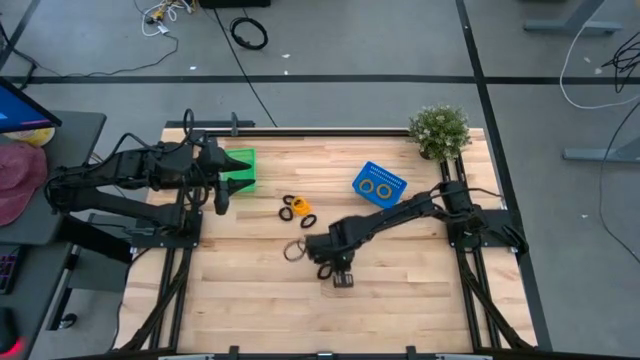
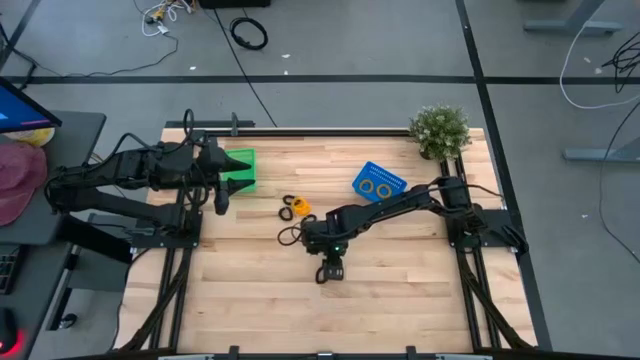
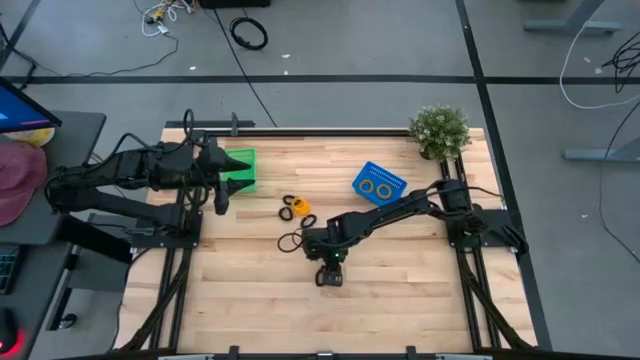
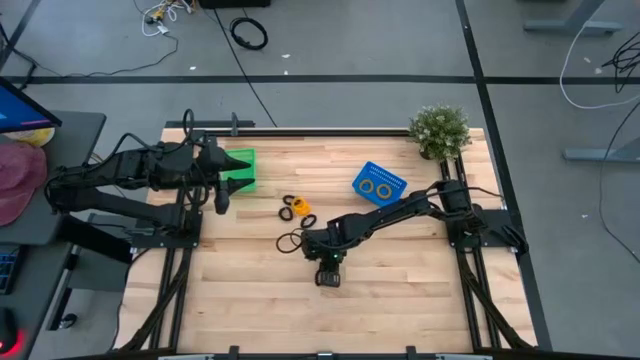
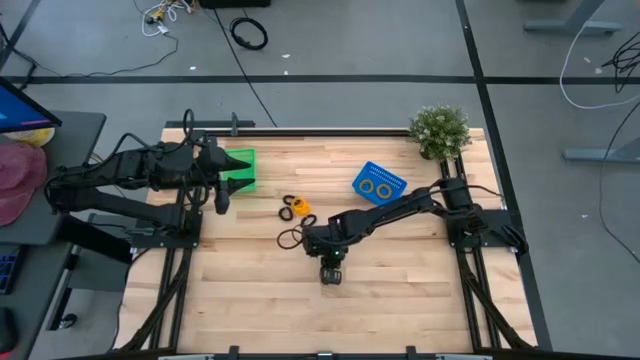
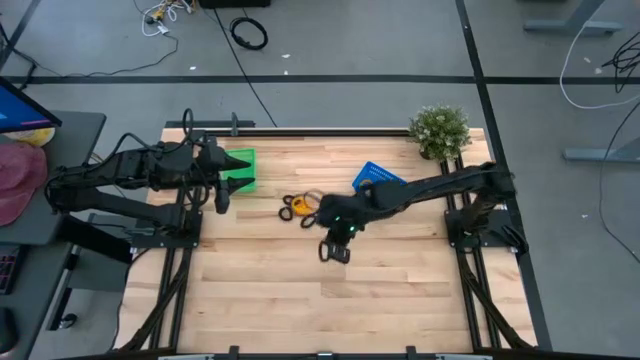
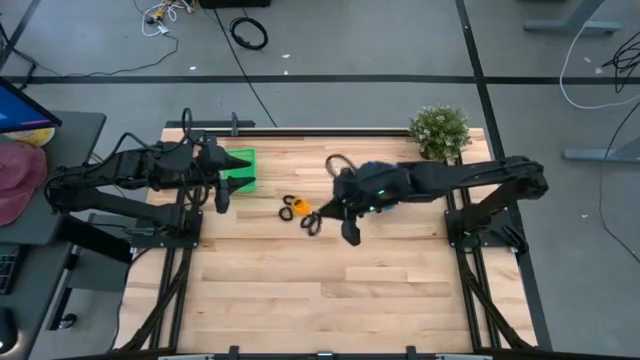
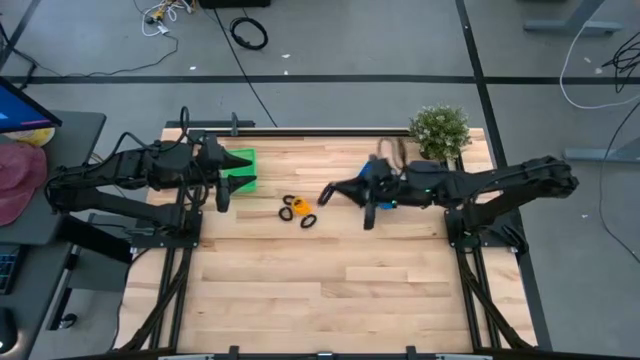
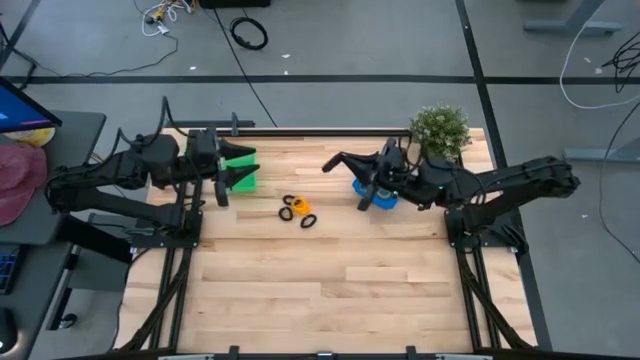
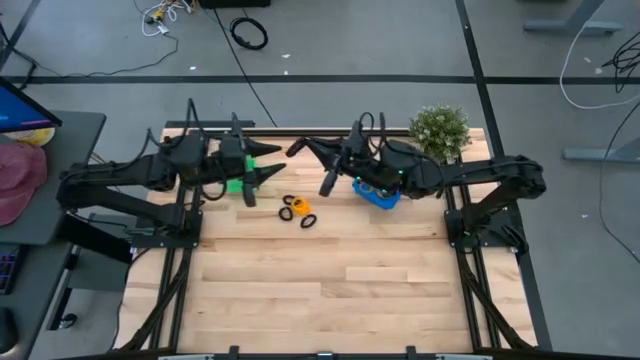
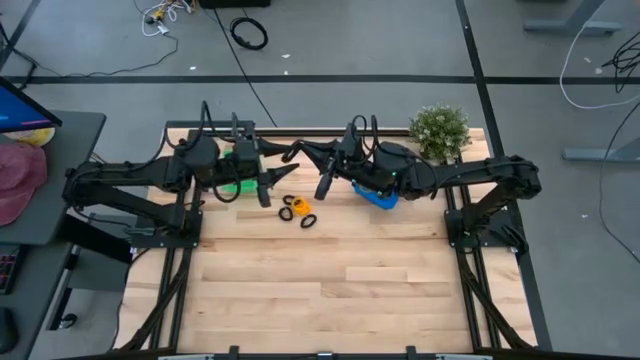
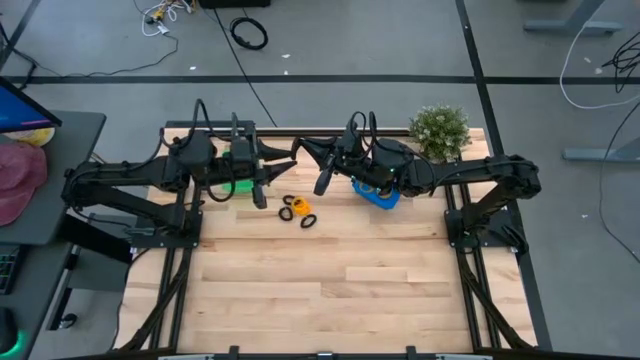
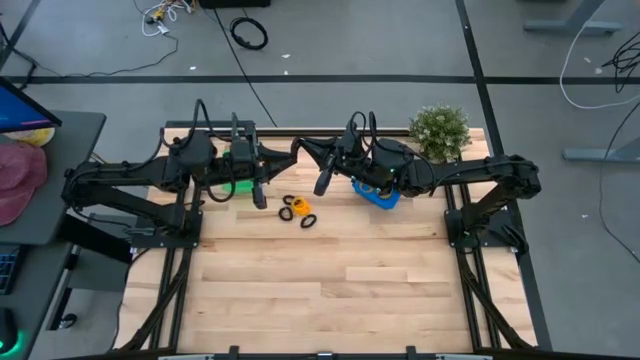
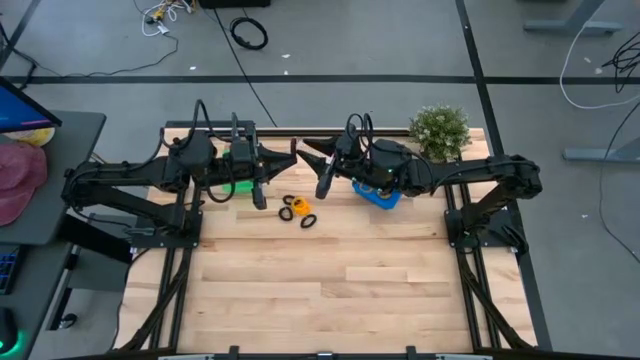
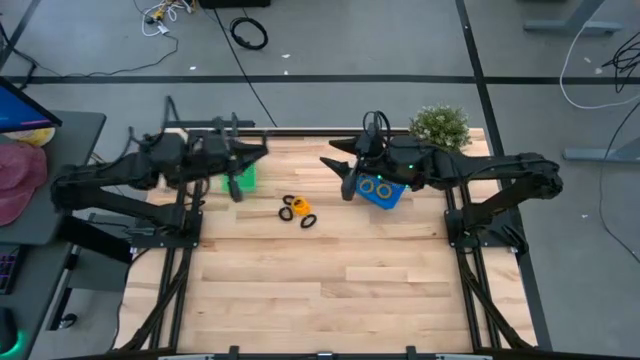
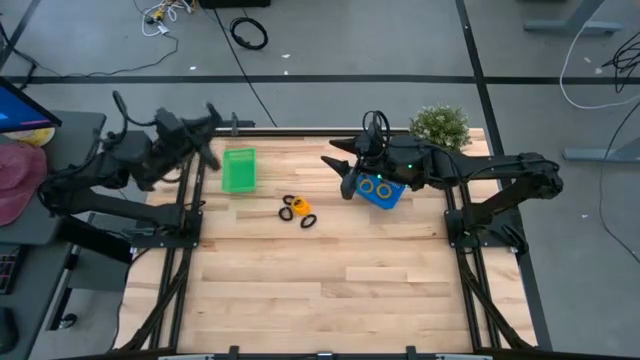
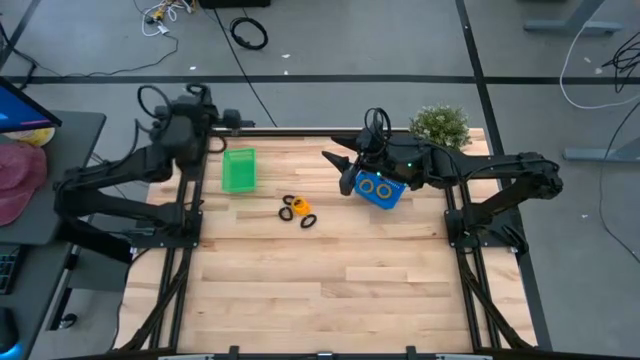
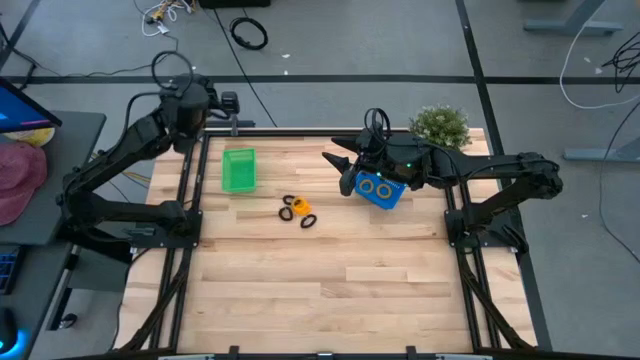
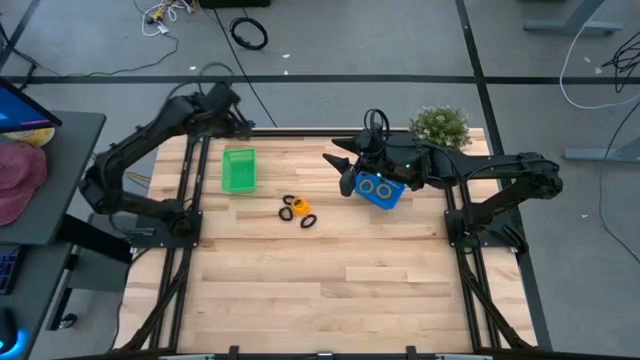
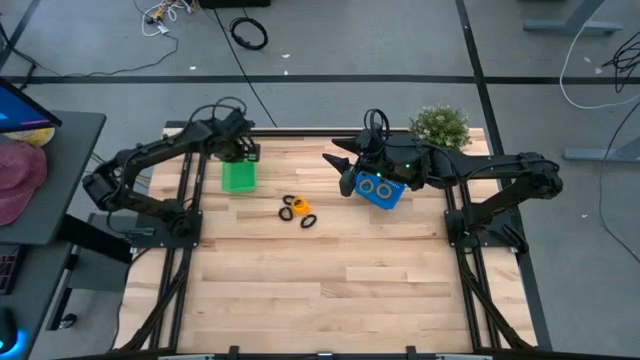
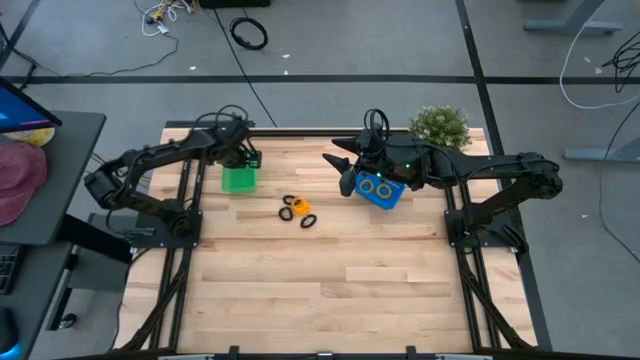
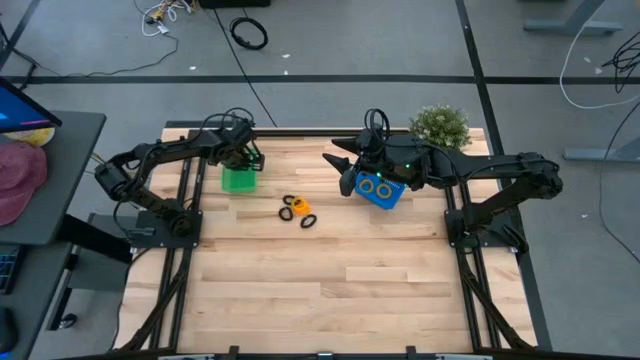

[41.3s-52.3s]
Task: Sort spring keychains
Put the black spring keychain into the green bin

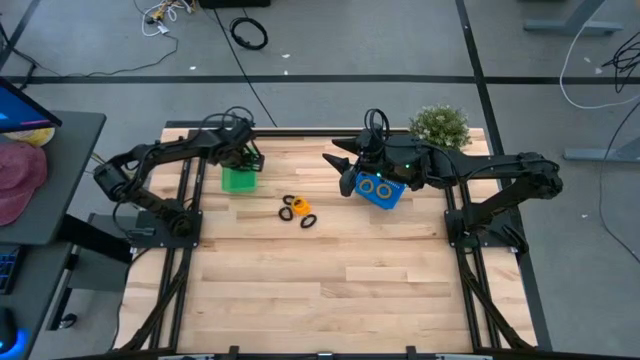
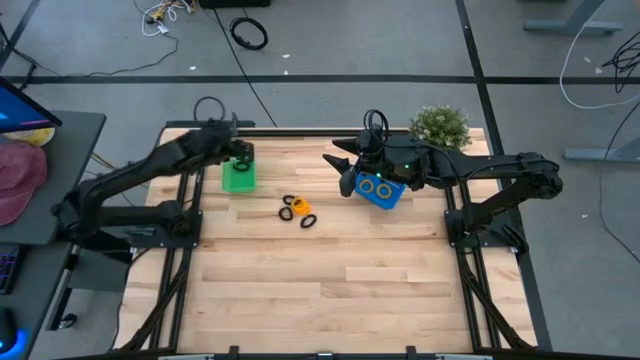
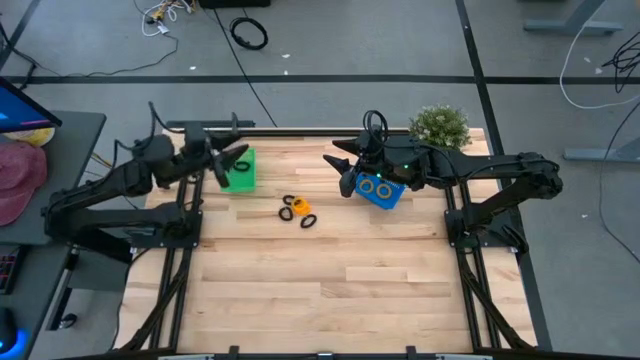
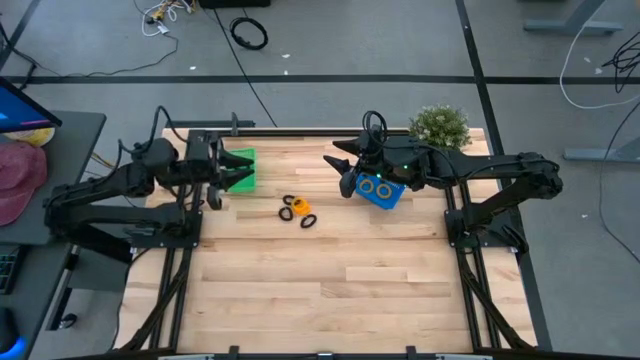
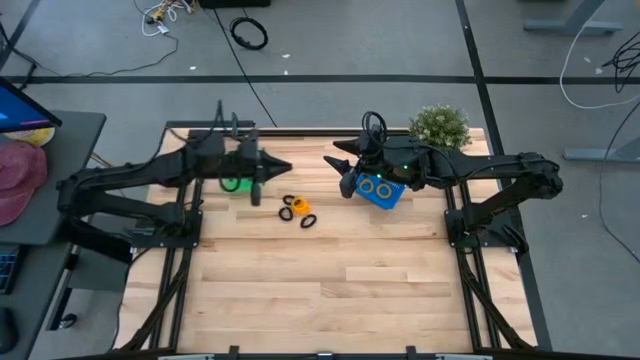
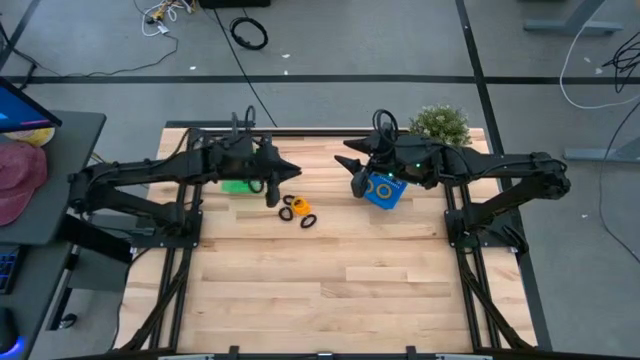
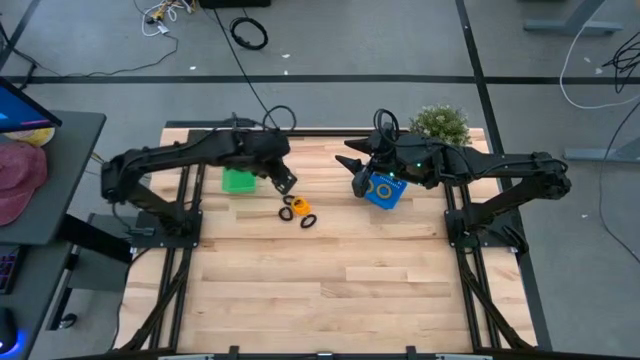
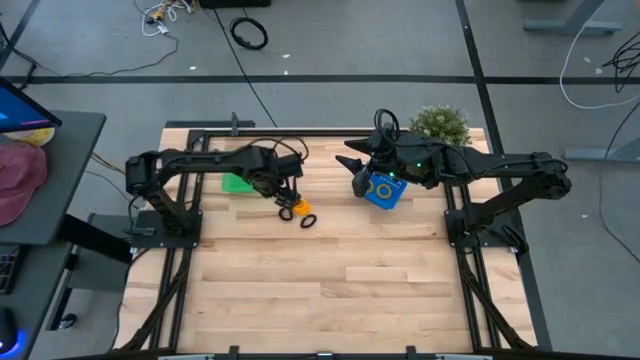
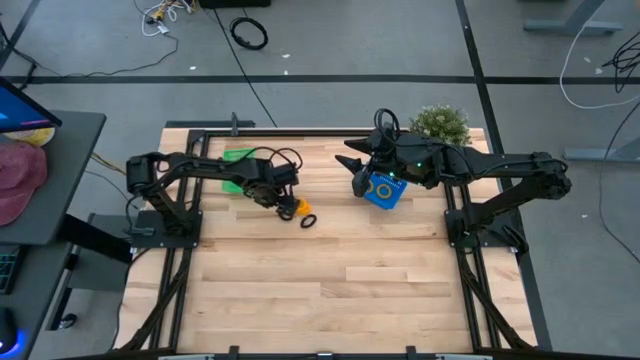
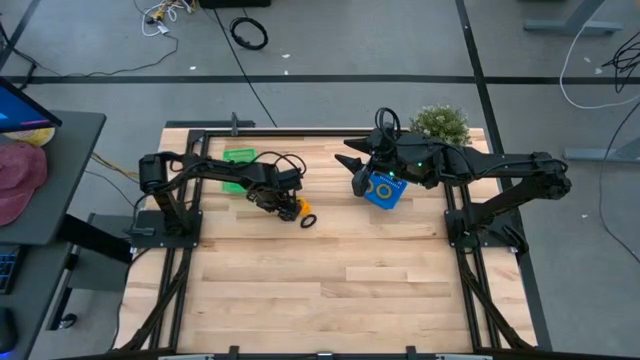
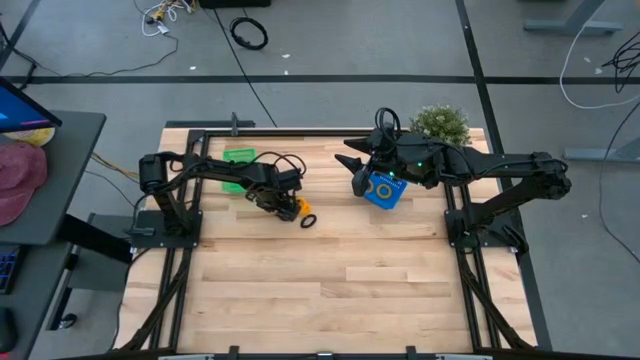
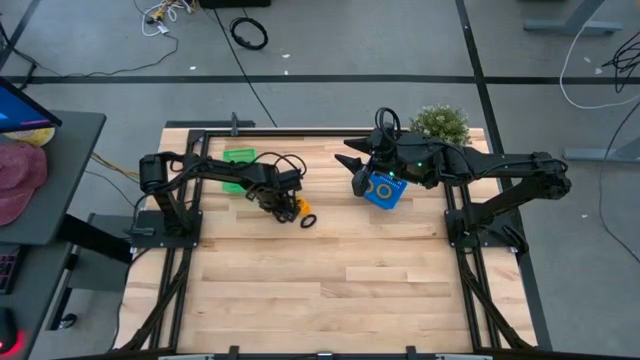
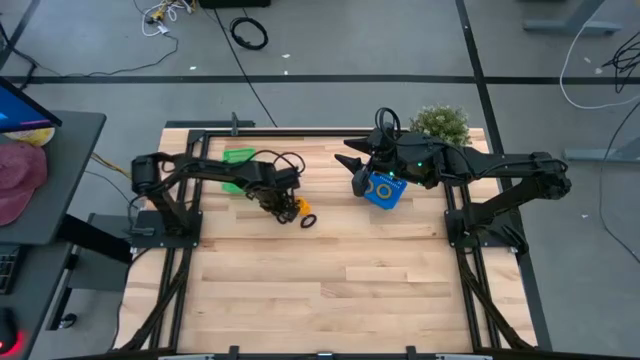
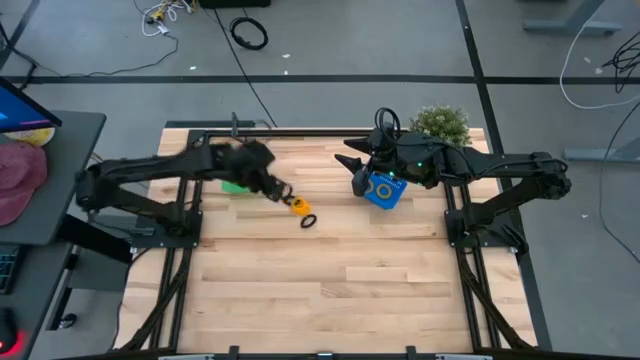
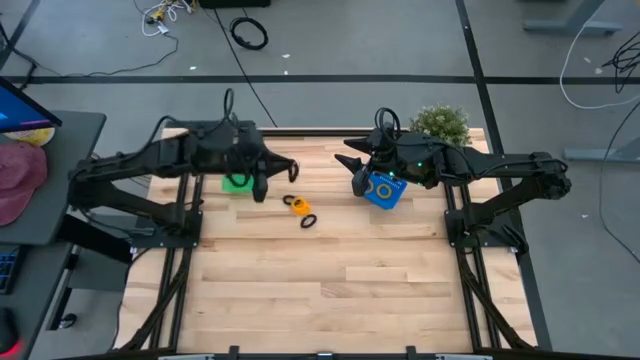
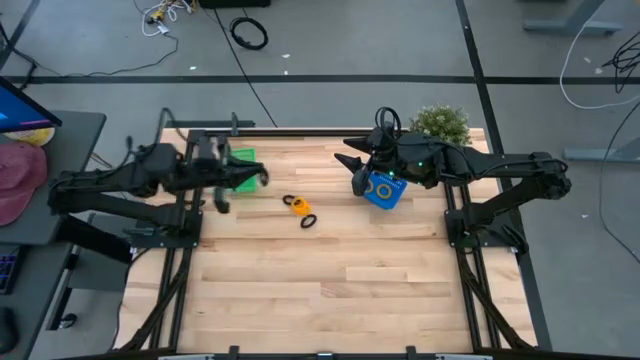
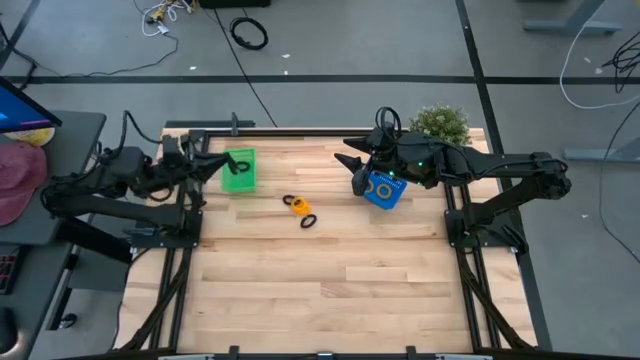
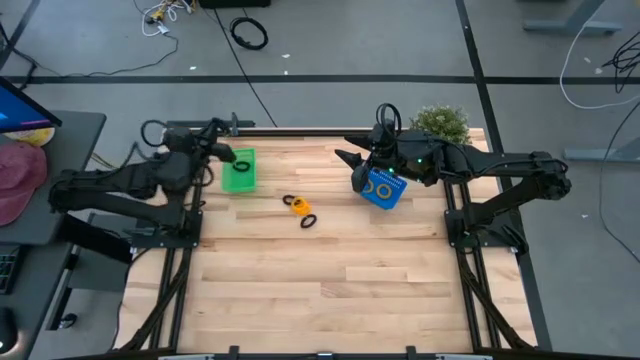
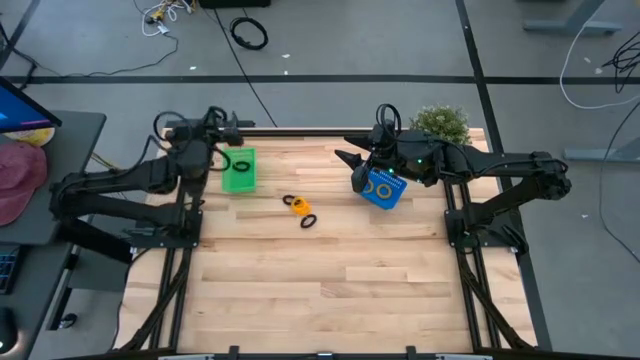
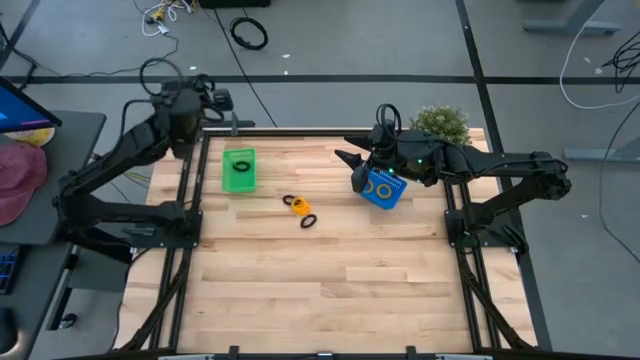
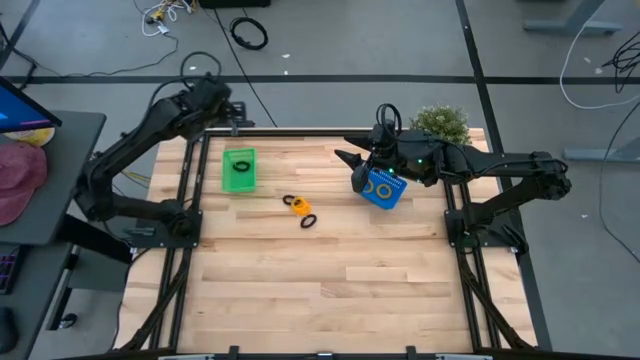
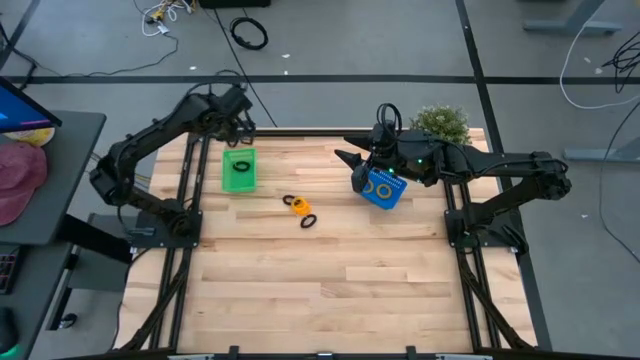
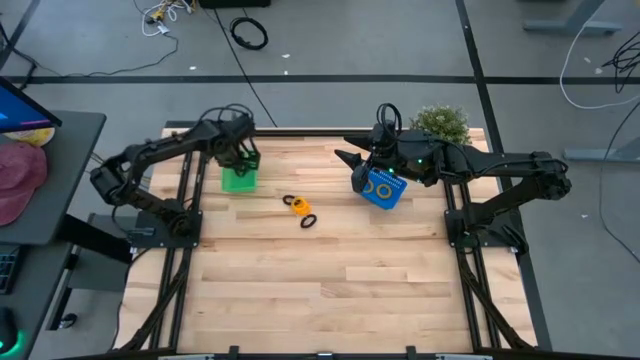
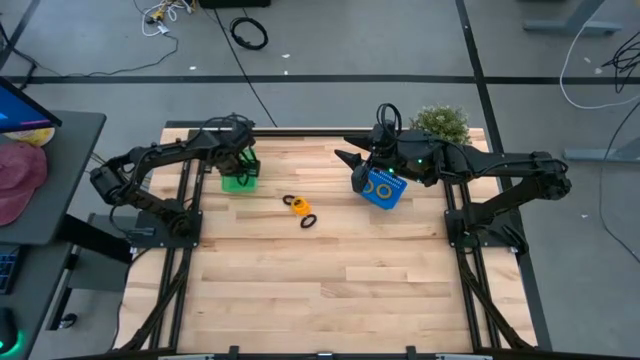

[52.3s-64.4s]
Put the black spring keychain into the green bin
